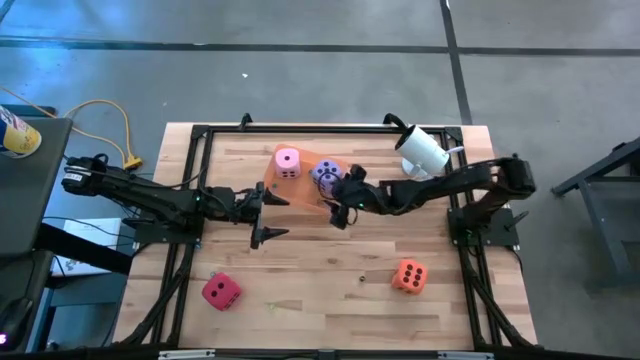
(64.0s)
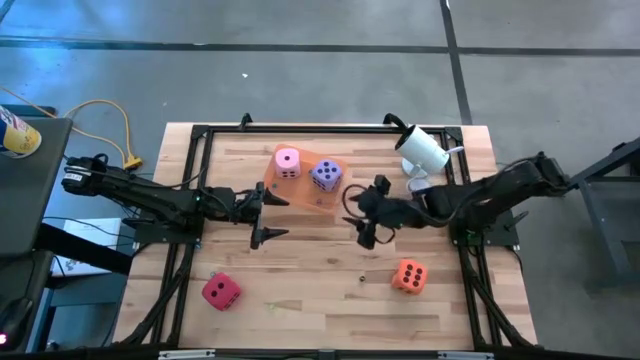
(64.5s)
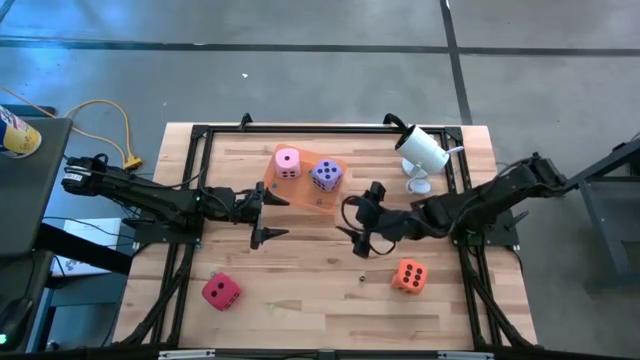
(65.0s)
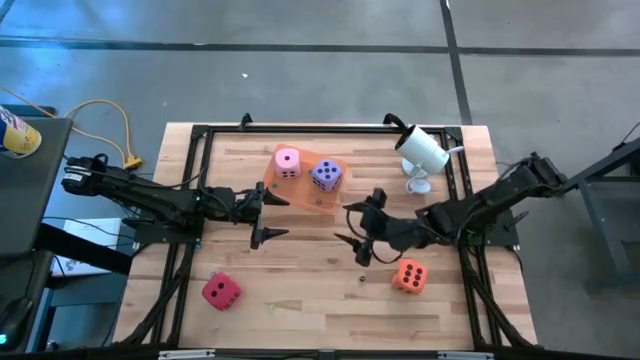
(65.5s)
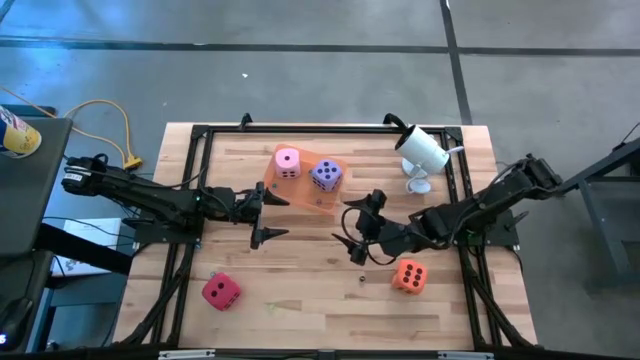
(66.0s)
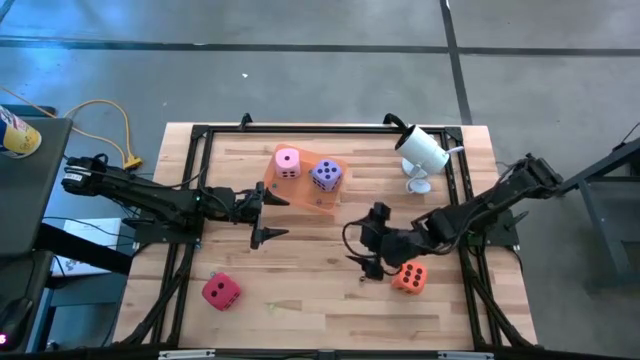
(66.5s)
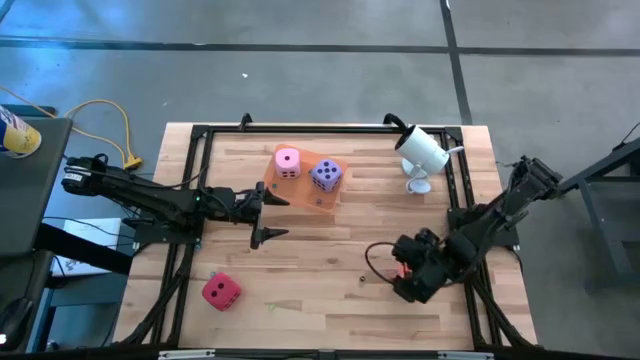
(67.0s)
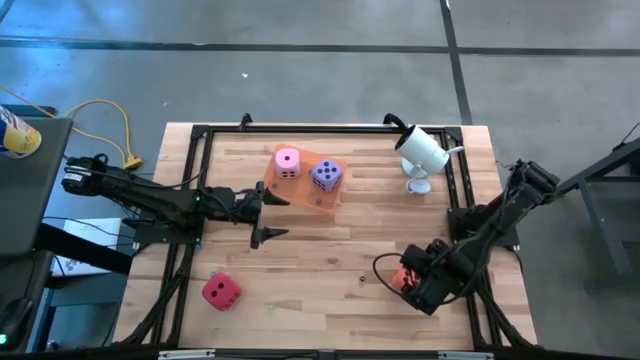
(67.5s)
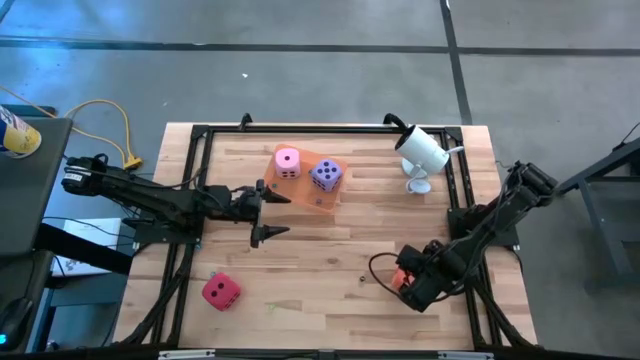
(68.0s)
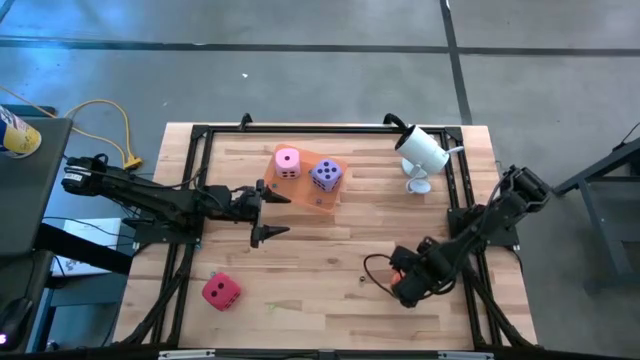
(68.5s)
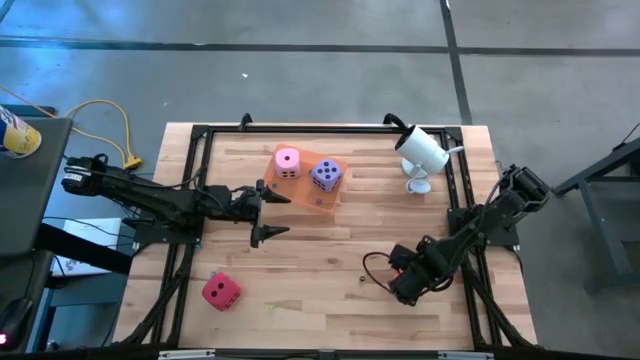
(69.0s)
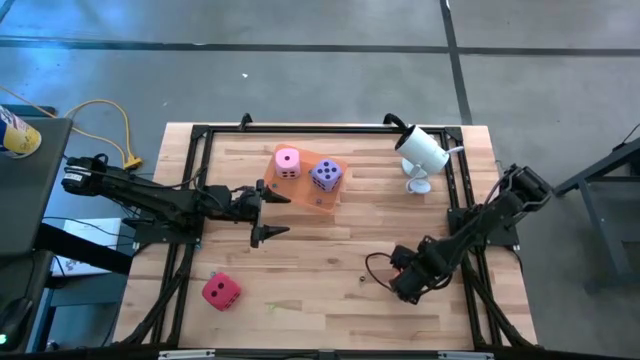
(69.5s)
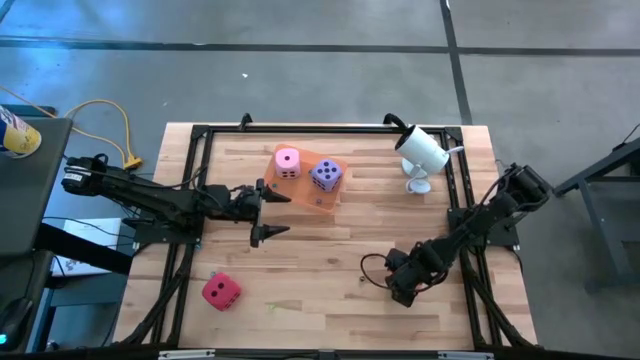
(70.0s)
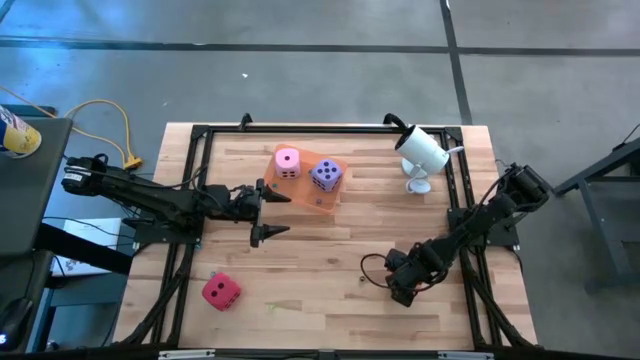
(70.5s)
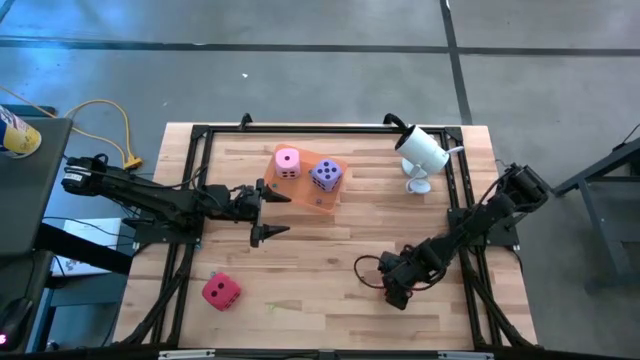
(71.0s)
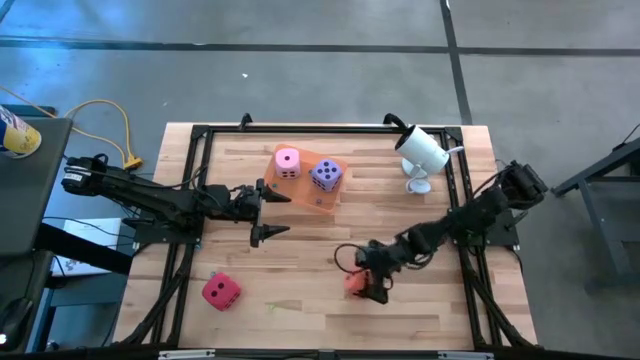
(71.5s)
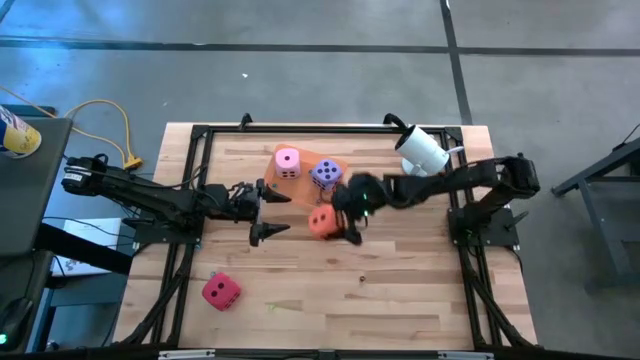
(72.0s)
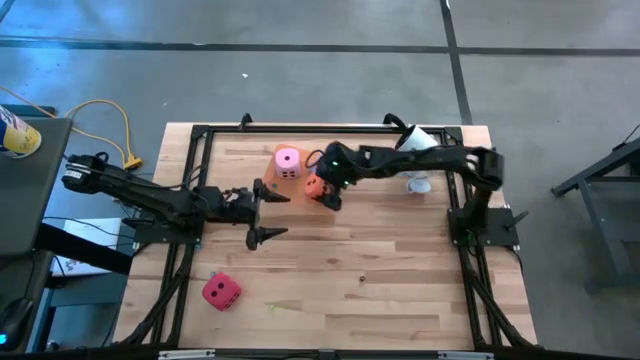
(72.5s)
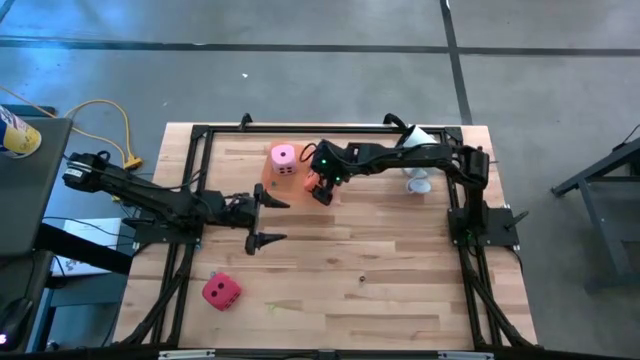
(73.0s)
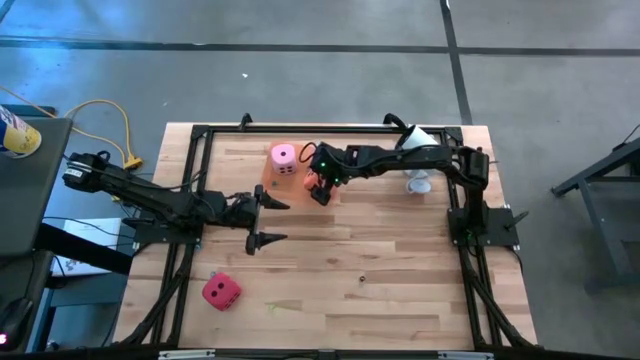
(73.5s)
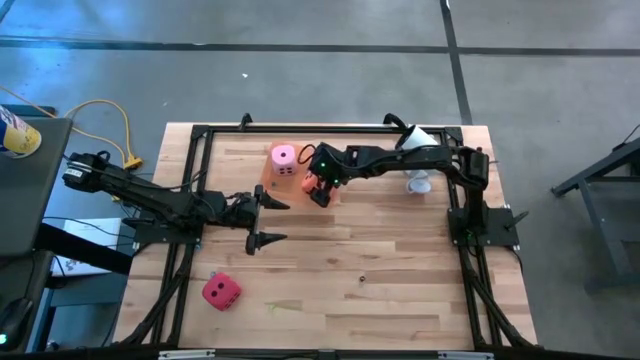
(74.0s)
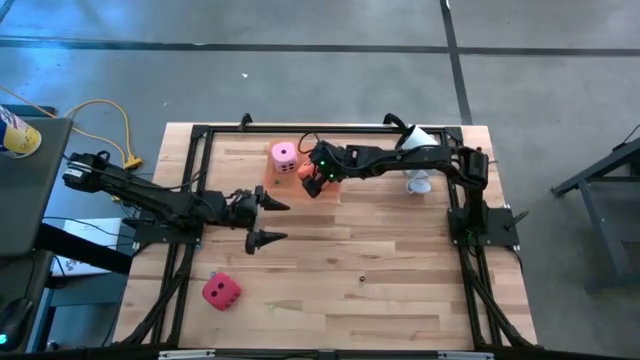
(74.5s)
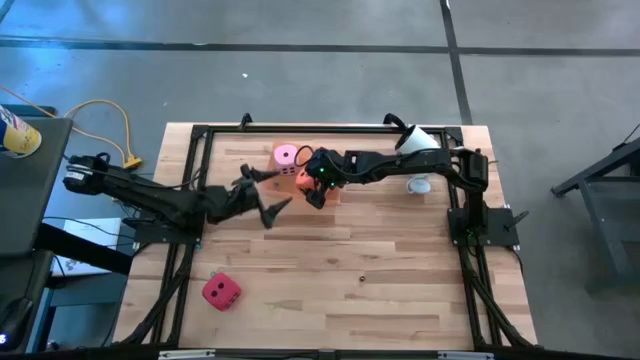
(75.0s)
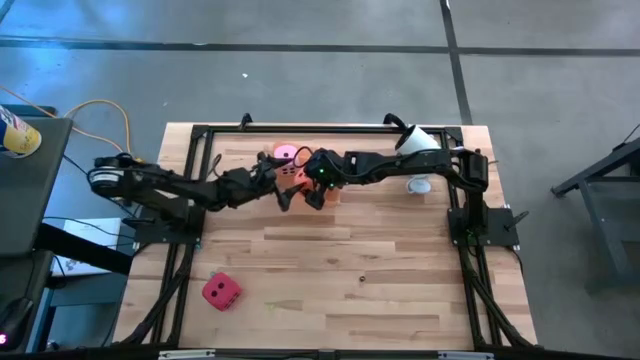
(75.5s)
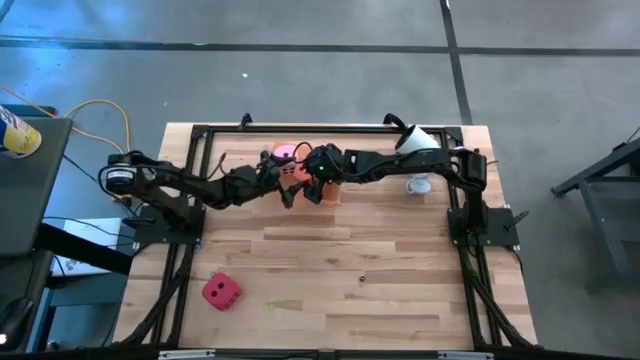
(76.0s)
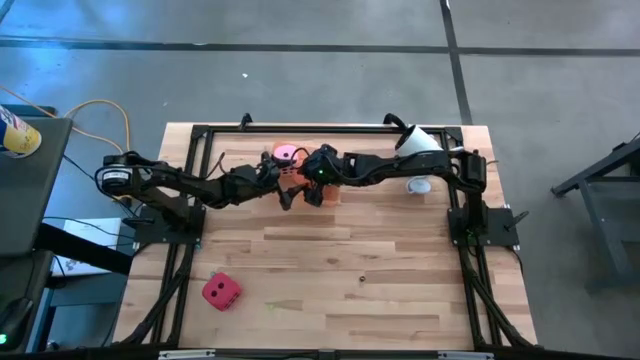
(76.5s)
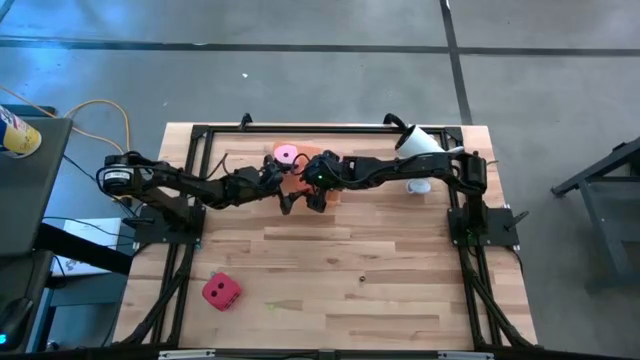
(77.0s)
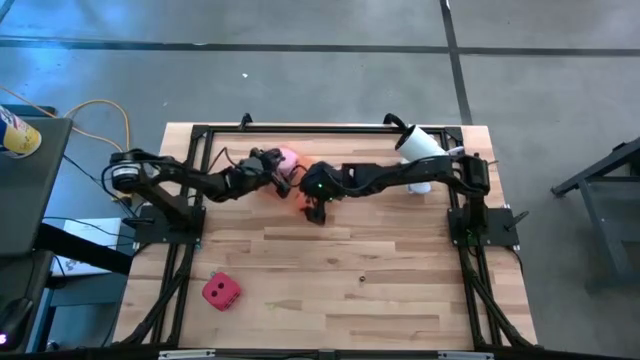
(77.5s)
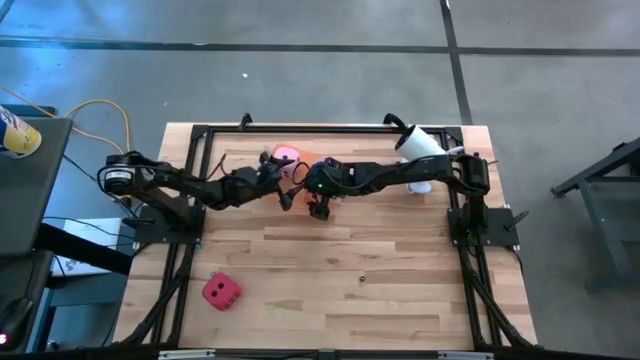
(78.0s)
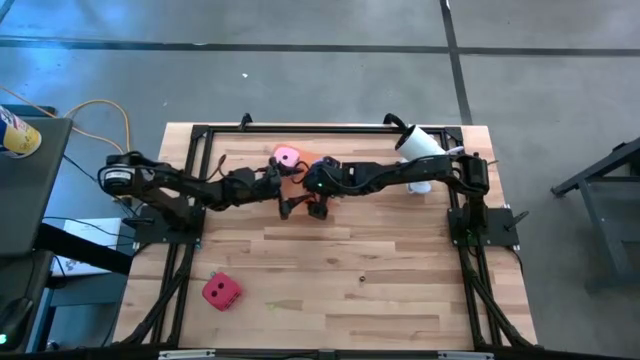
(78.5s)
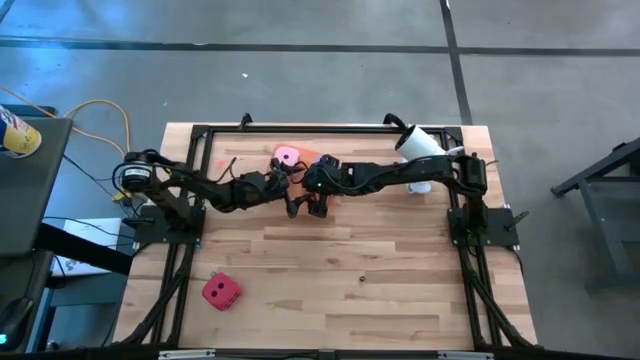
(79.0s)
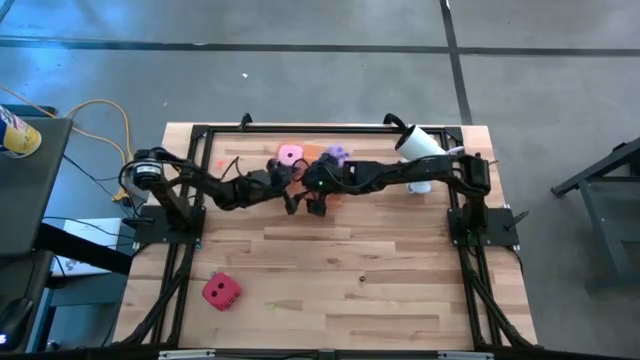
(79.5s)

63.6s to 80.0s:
Task: Pick & Place Dice
Put the large orange die into the orange bin

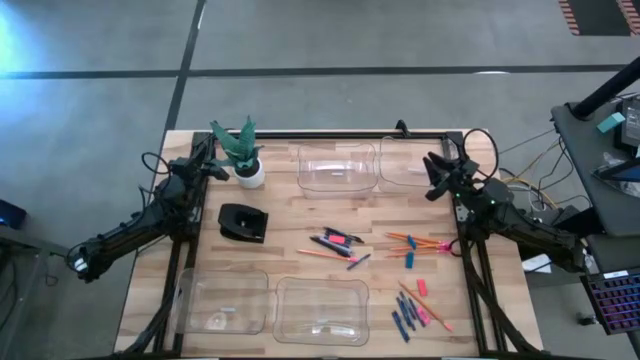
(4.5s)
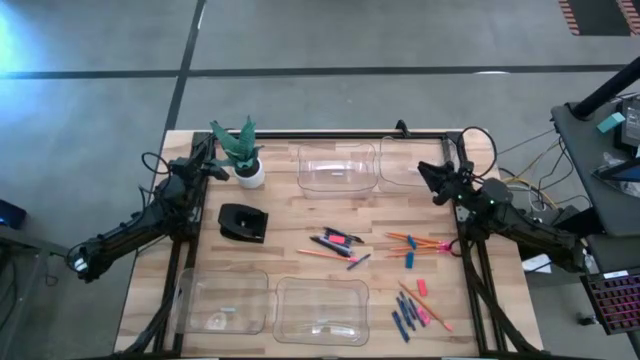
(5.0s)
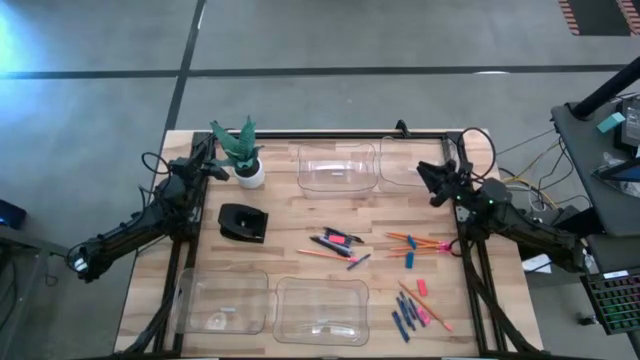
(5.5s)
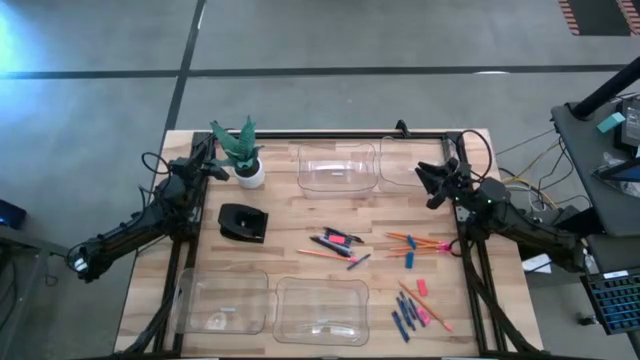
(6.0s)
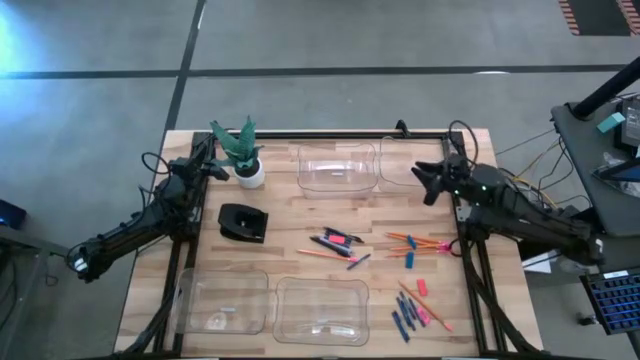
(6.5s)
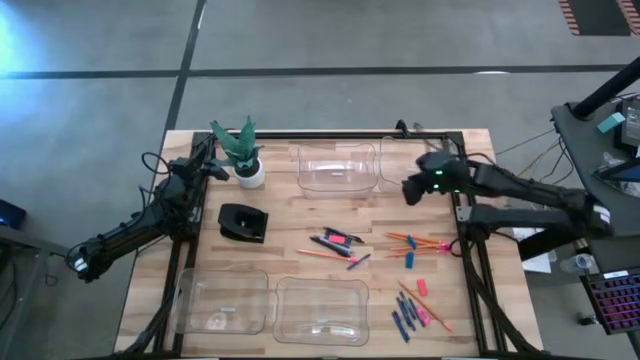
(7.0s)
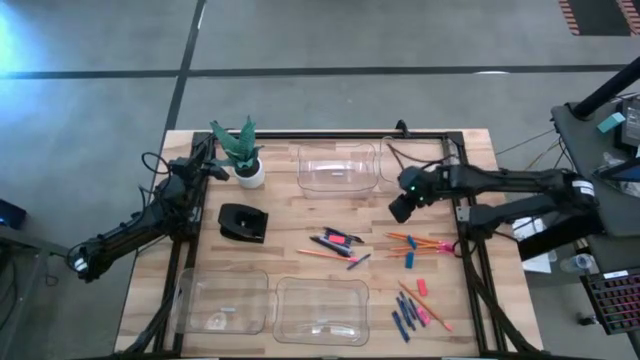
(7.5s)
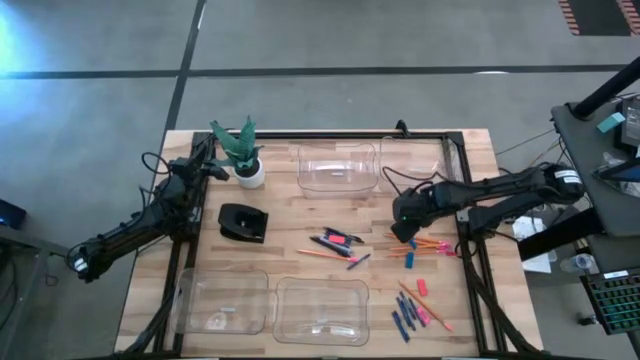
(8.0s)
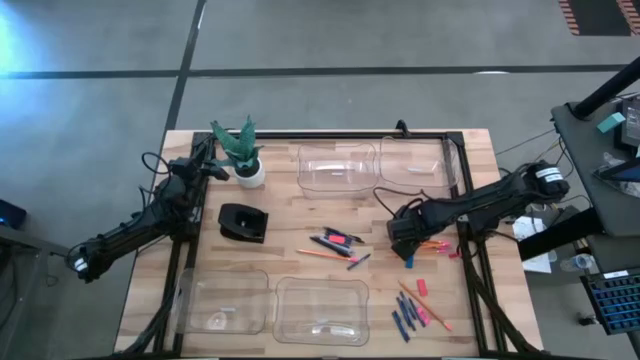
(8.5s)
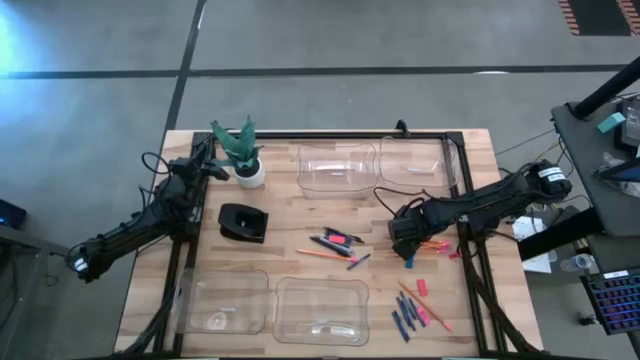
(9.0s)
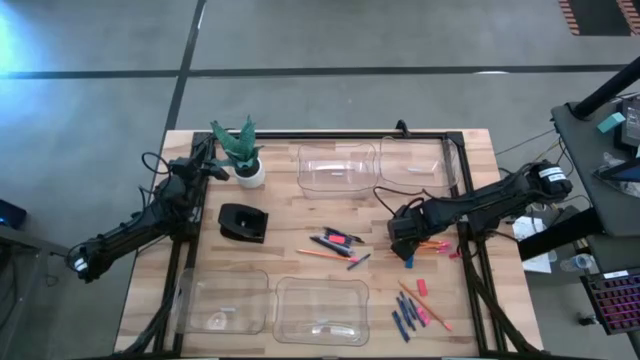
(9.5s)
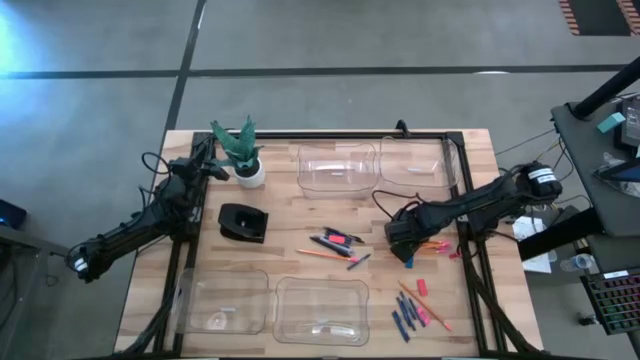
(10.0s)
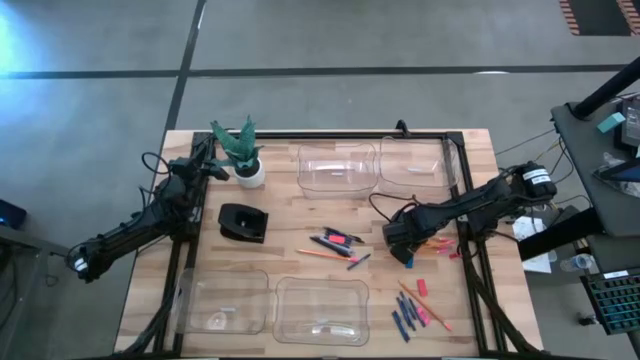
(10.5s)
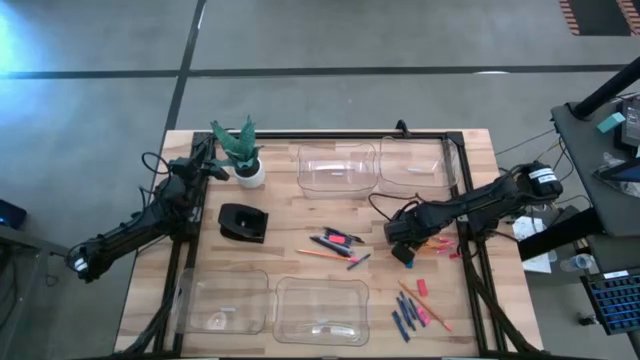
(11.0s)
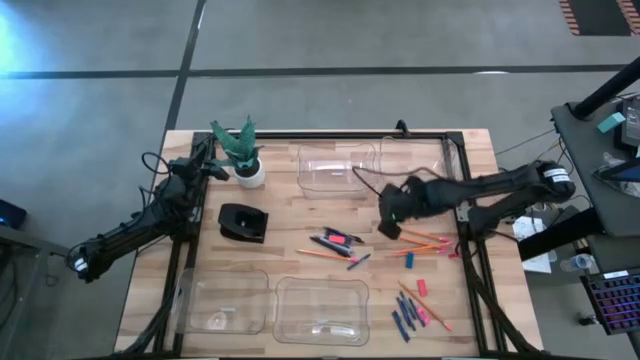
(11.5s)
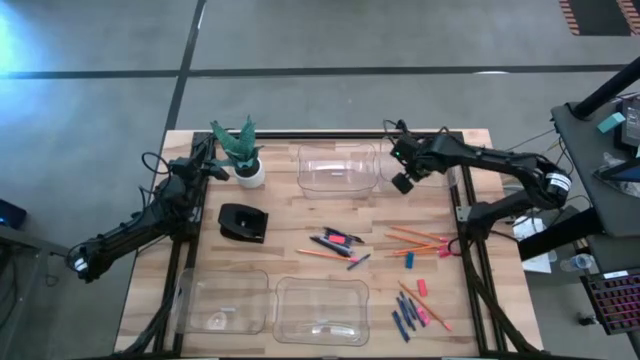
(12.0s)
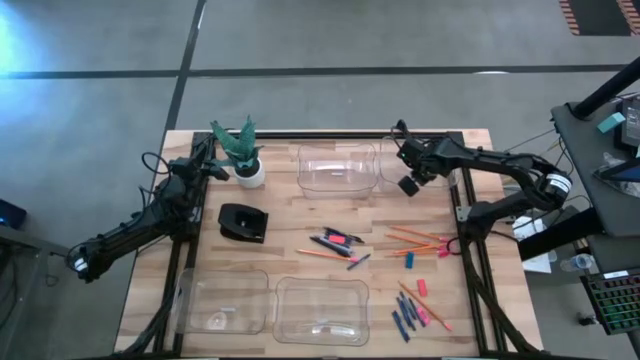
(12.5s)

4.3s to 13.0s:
Task: Sort crayons/erasers/pens/pencils in bins
Put the blue eraser into the top right transparent bin
